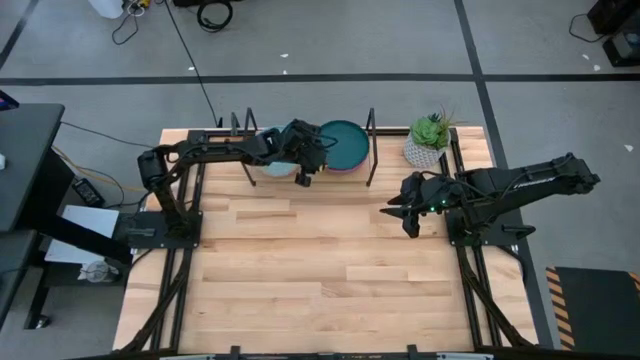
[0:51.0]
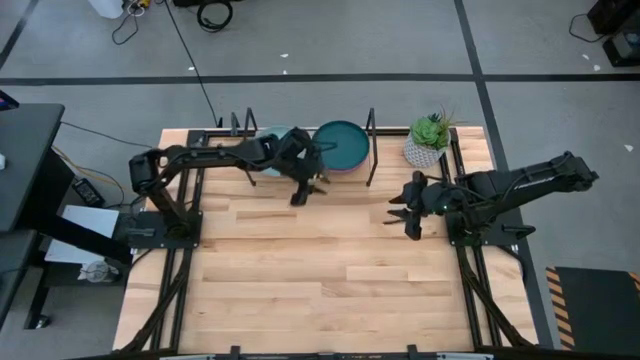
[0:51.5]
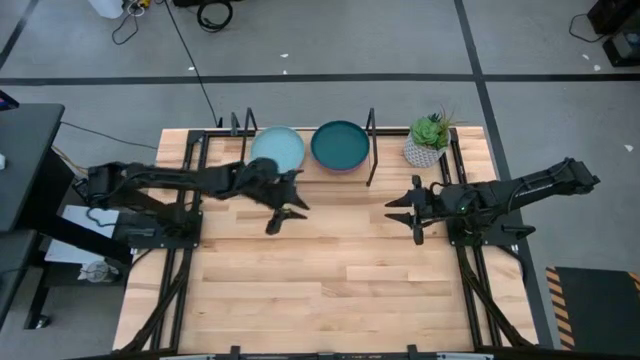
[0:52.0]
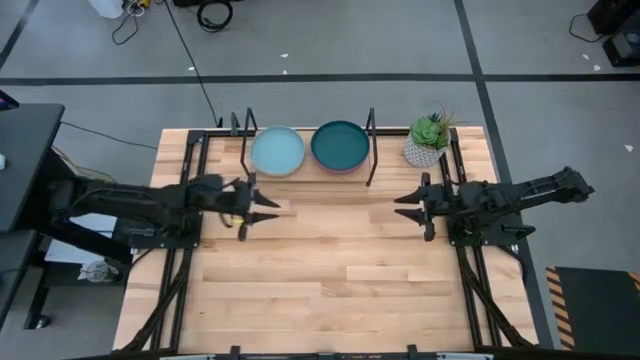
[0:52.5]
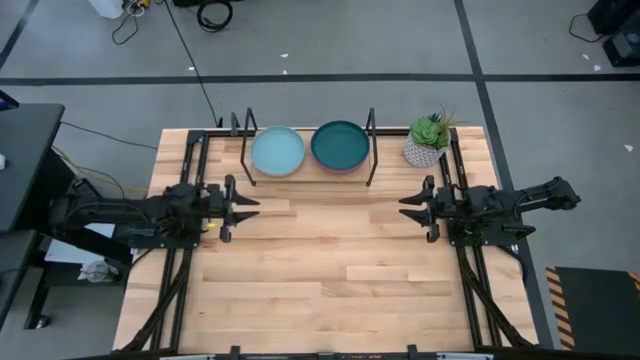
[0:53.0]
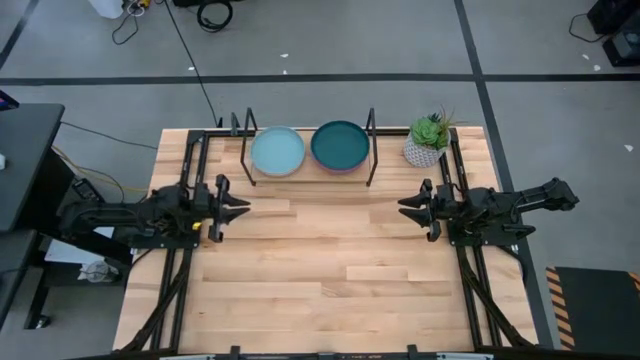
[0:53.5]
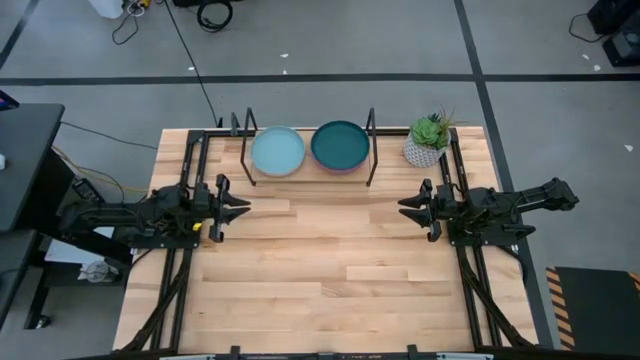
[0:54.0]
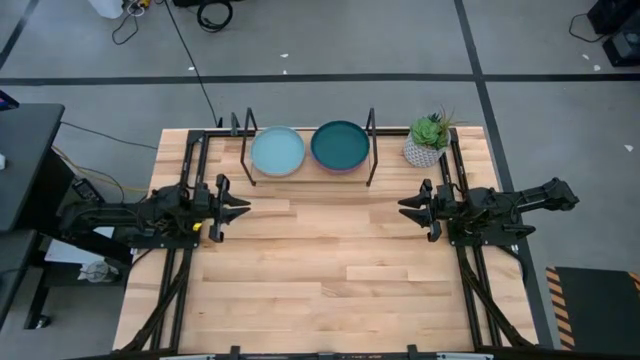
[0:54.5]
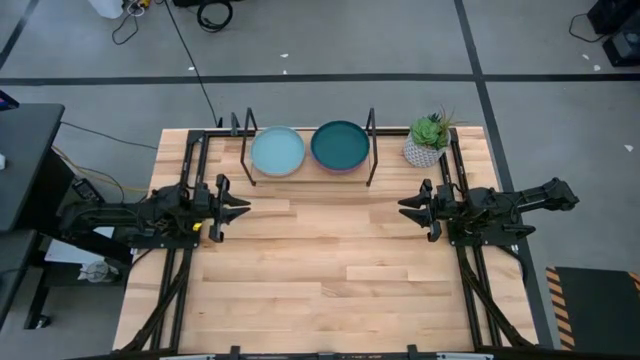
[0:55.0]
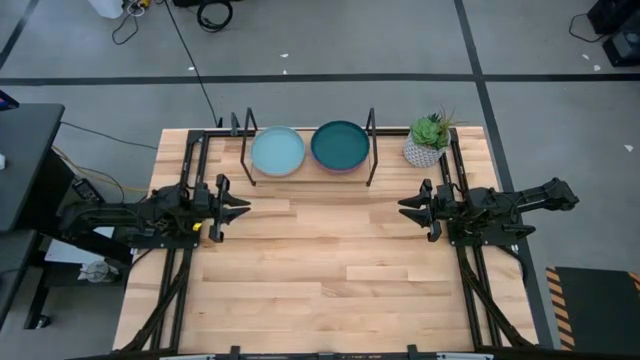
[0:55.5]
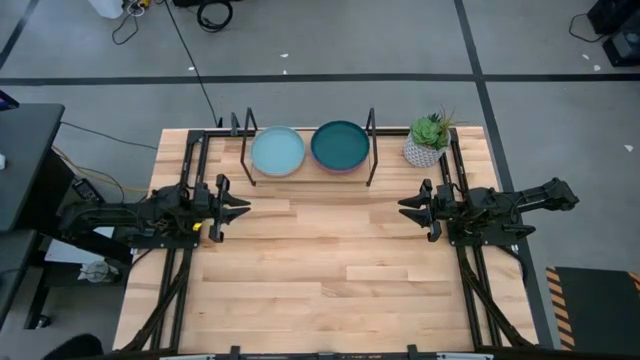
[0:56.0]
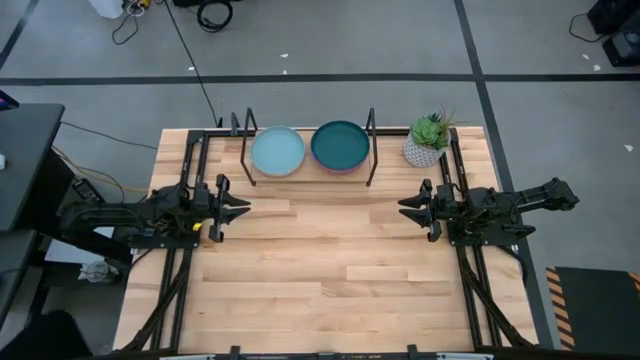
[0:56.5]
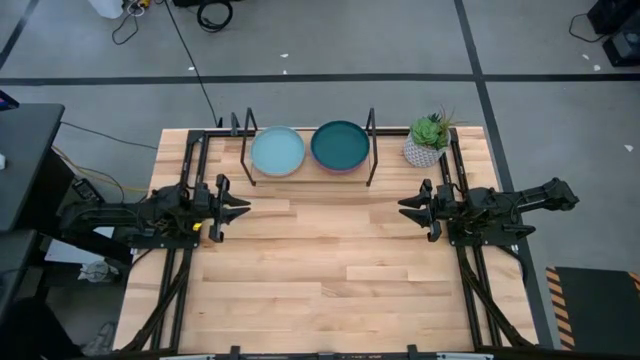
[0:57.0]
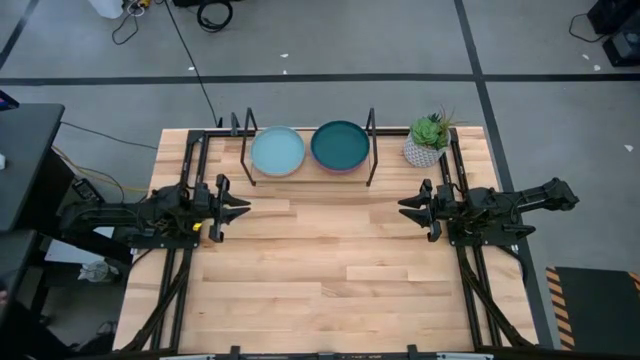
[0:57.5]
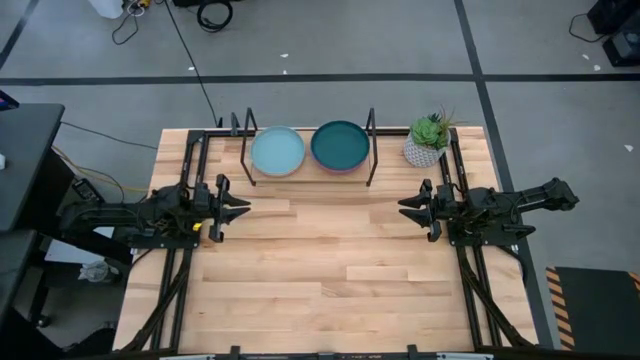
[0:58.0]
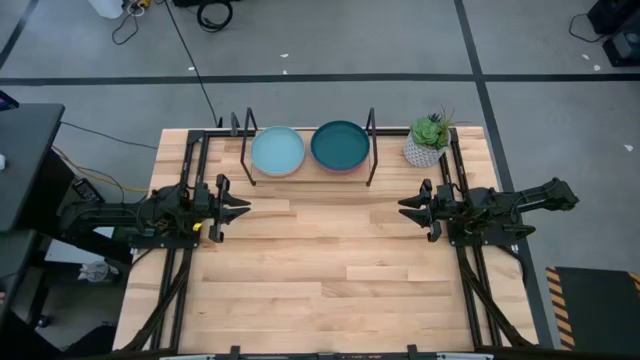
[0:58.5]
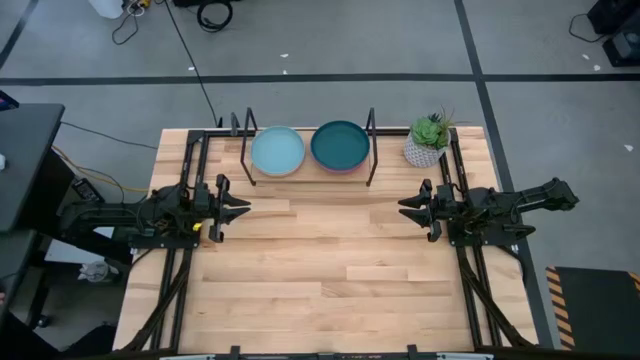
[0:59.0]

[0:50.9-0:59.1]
Task: Place and stack plates onto a shelf
Return to Home Position

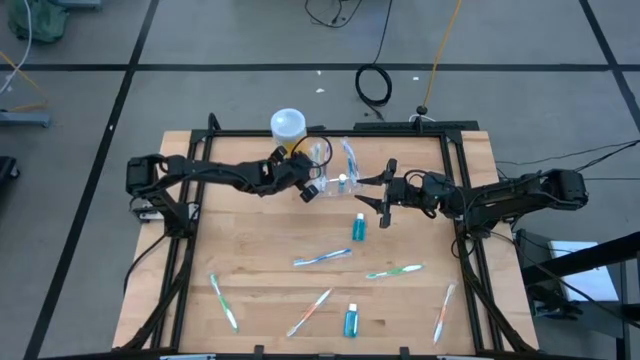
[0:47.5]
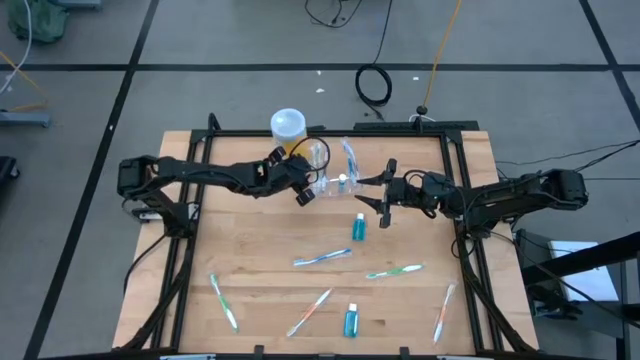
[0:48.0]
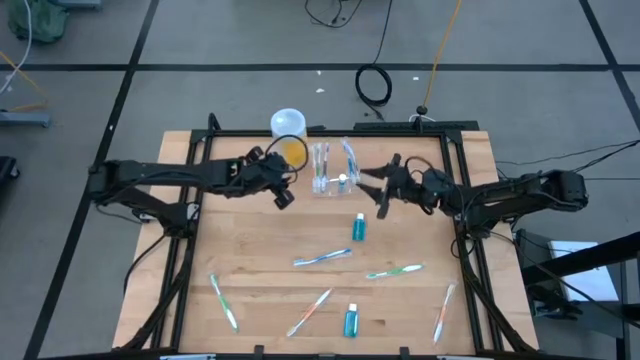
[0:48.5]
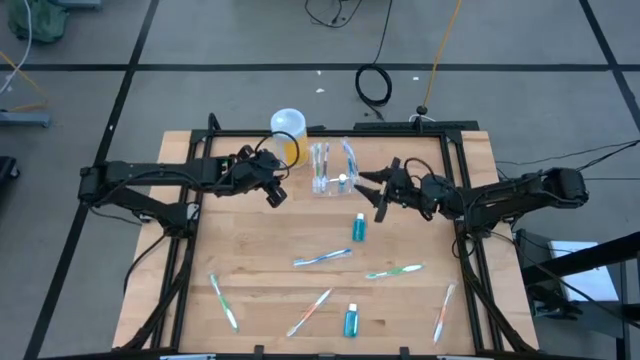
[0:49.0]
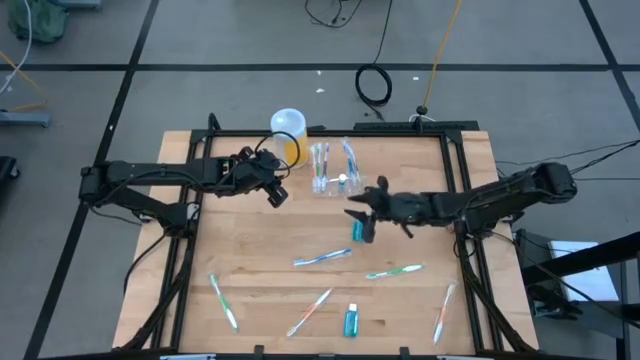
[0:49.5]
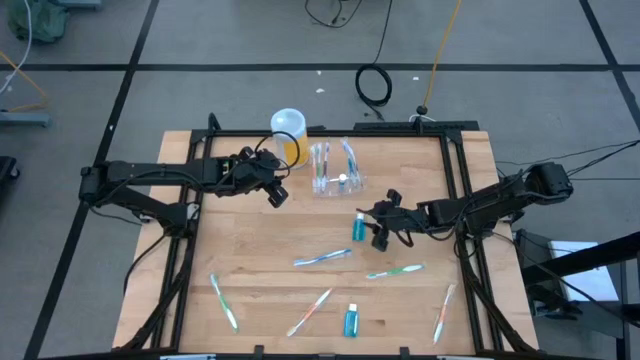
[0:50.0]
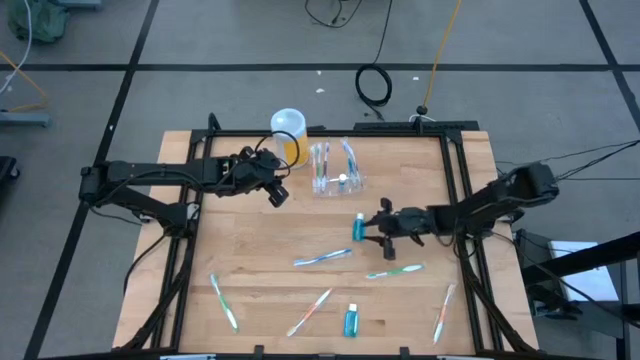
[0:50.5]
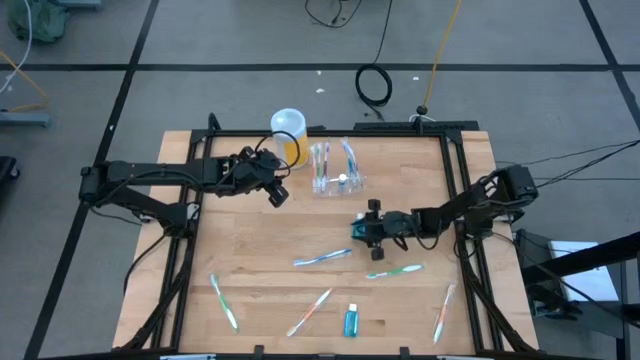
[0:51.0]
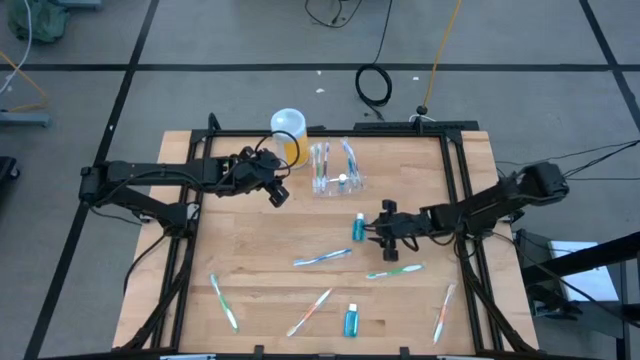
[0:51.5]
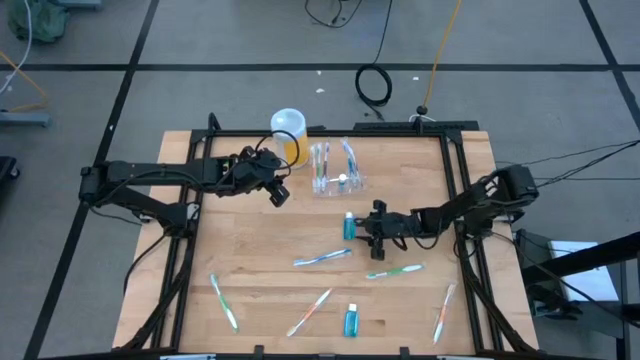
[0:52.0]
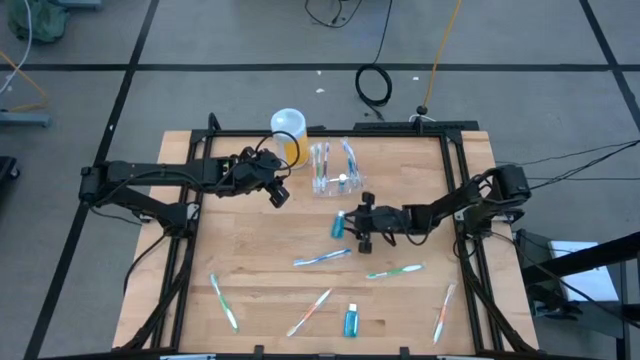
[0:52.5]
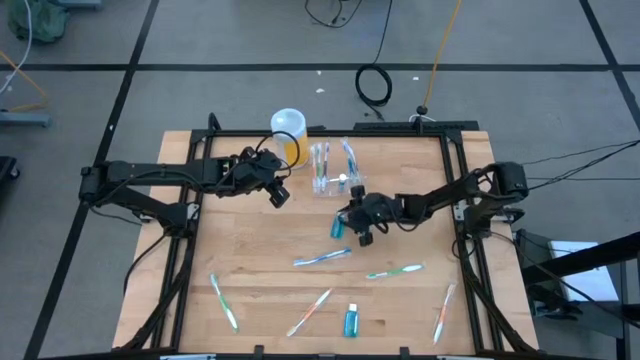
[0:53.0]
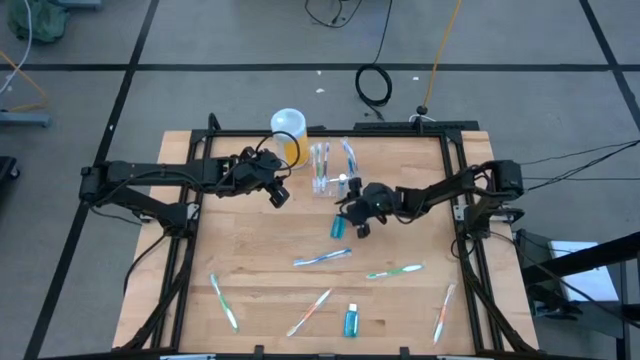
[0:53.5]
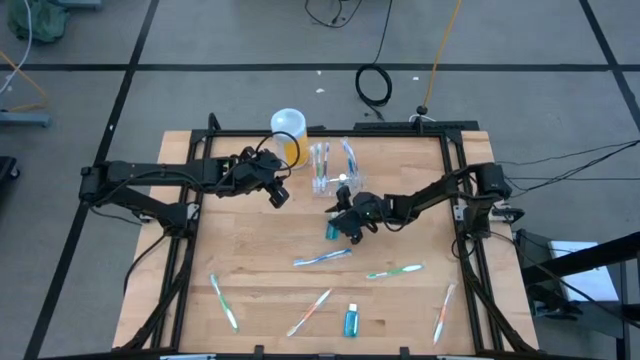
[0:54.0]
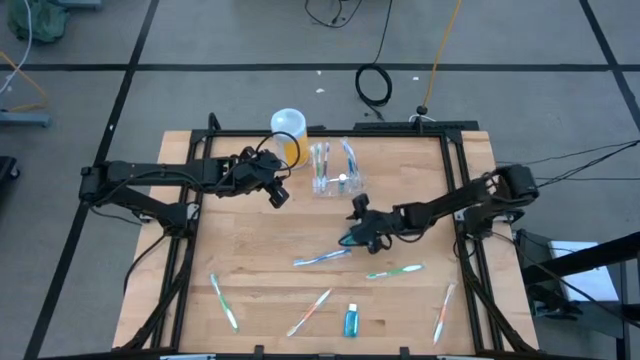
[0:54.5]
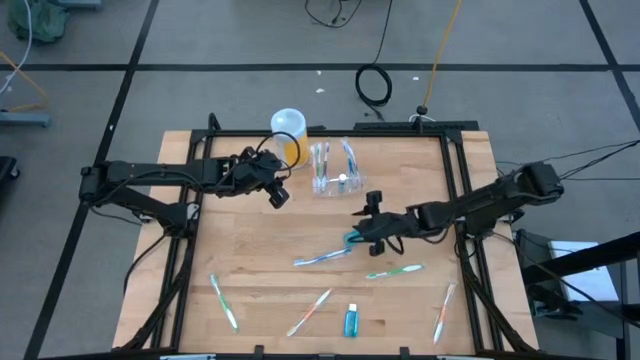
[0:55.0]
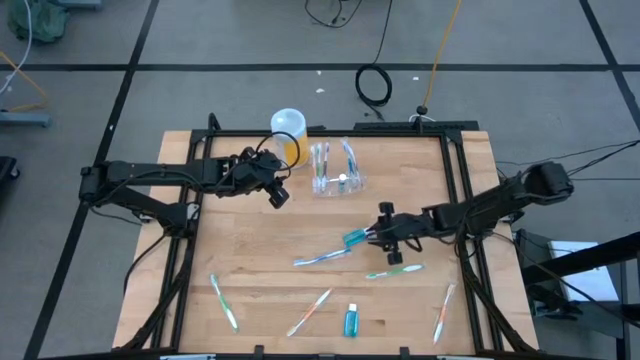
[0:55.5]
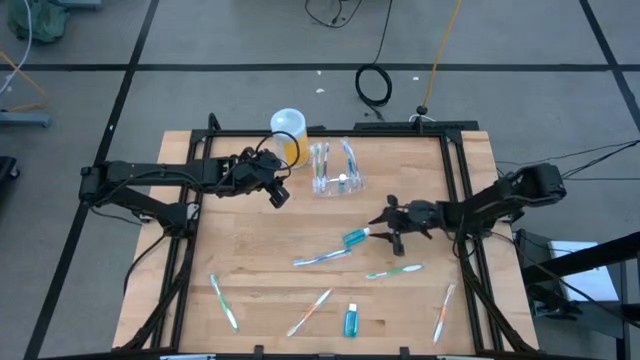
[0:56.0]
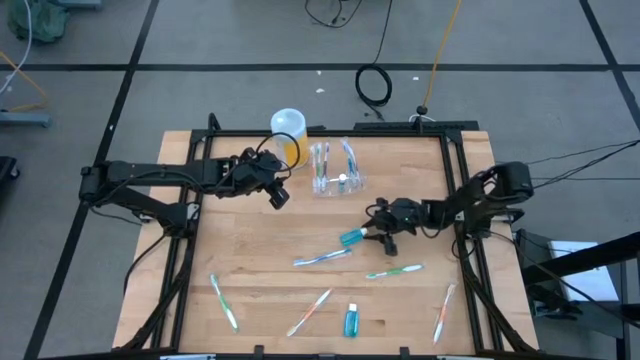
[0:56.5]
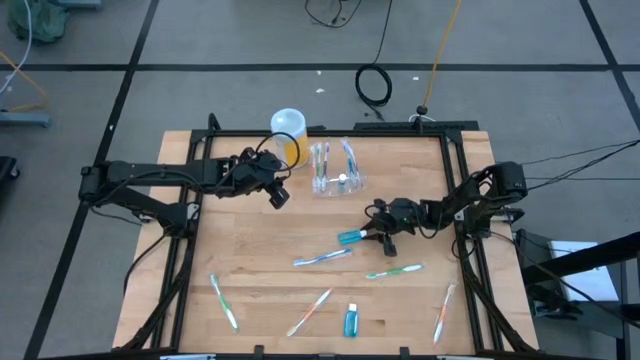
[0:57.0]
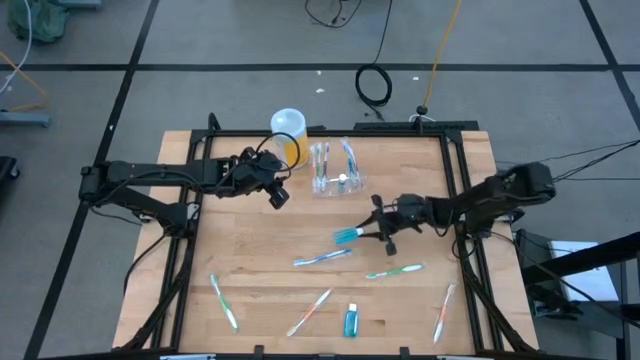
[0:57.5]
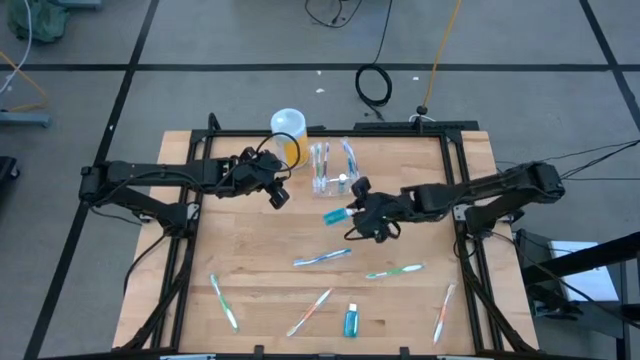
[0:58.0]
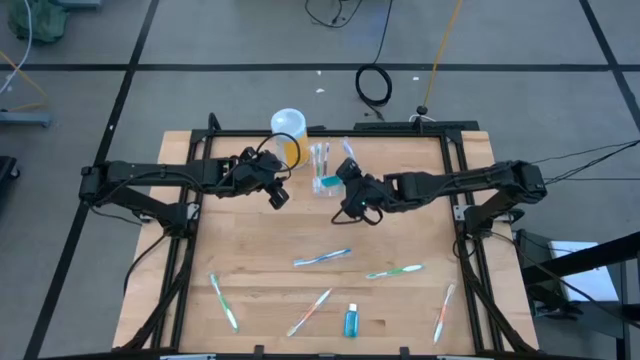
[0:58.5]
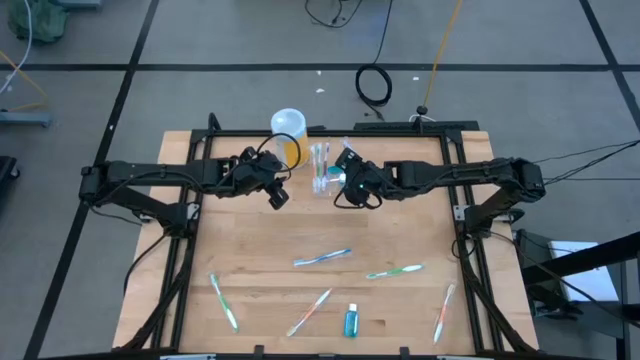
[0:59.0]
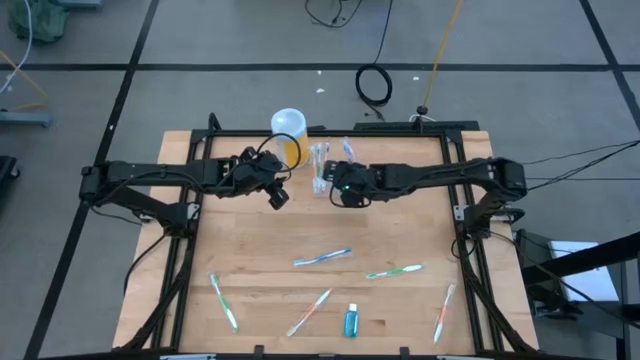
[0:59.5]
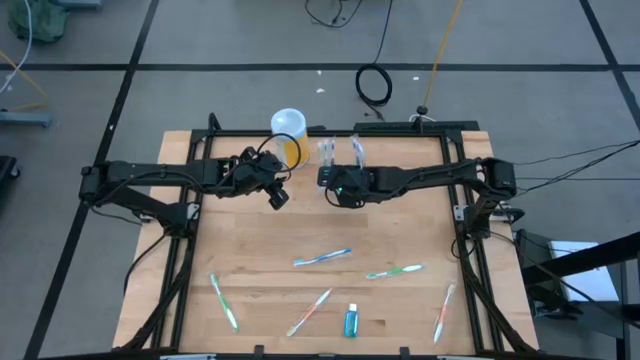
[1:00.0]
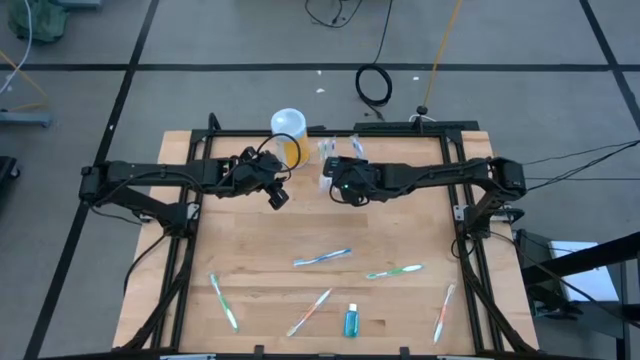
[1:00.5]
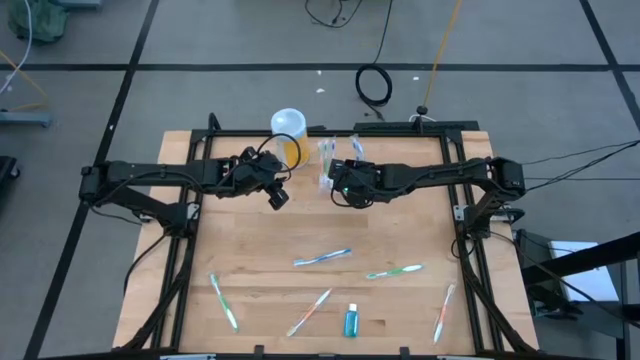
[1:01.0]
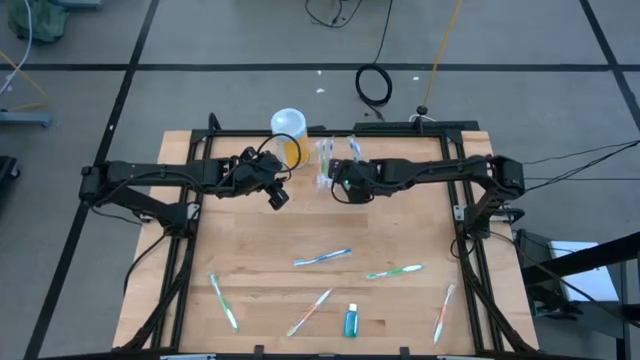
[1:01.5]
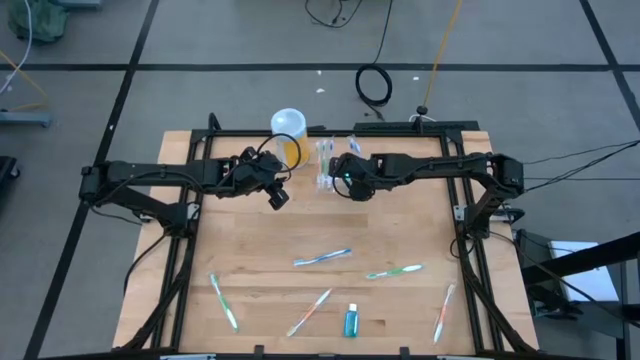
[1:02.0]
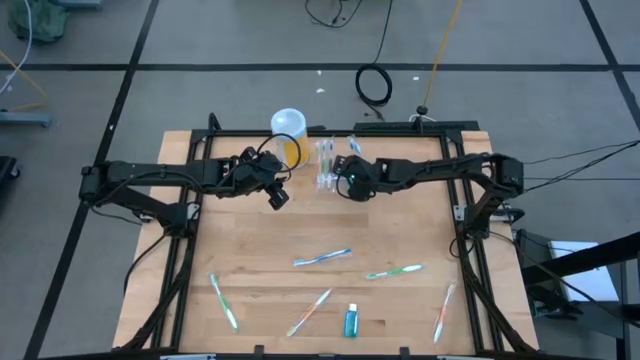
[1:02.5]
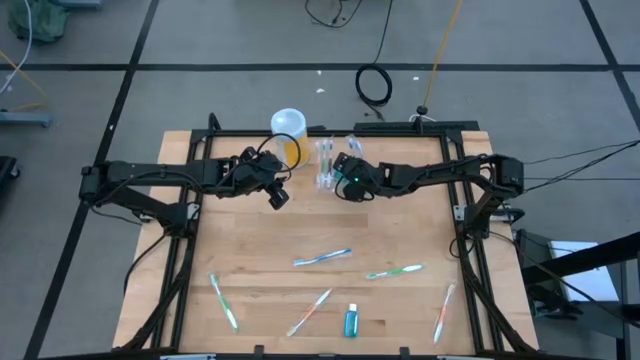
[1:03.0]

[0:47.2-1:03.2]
Task: Pick & Place toothbrushing station
Put the top mouthwash into the transparent organizer
